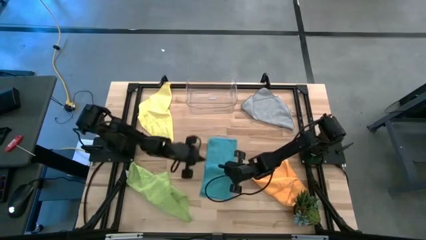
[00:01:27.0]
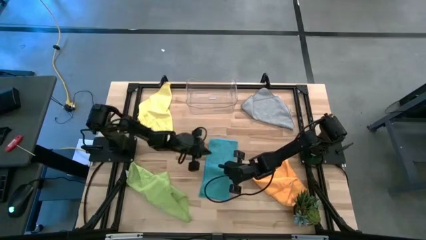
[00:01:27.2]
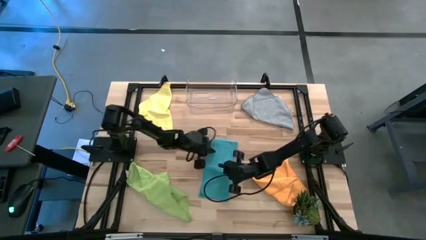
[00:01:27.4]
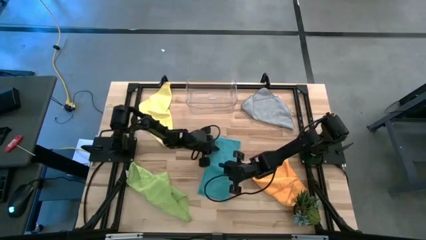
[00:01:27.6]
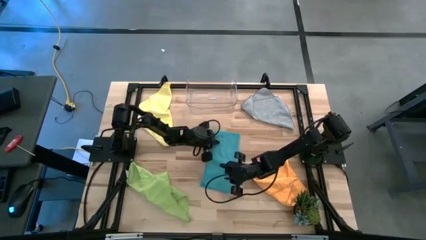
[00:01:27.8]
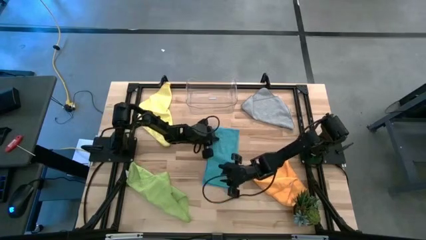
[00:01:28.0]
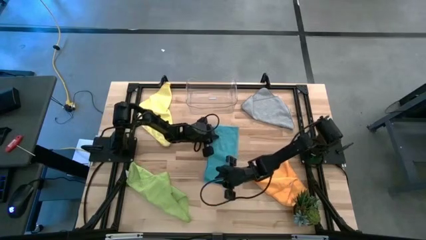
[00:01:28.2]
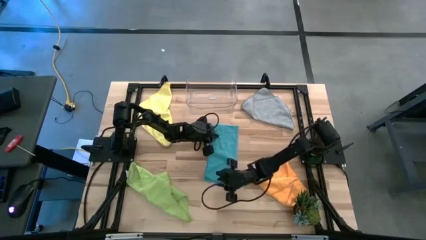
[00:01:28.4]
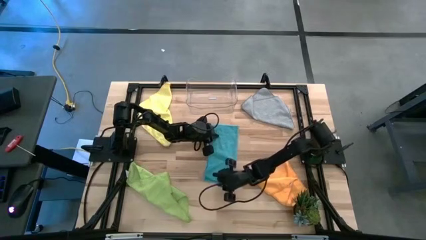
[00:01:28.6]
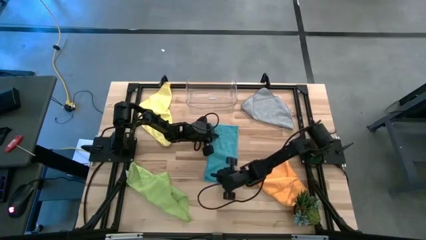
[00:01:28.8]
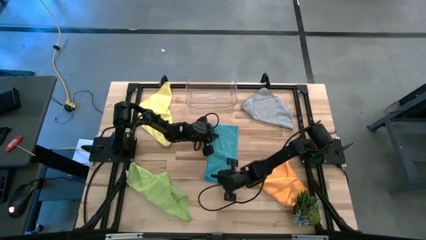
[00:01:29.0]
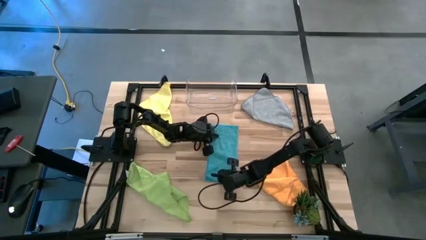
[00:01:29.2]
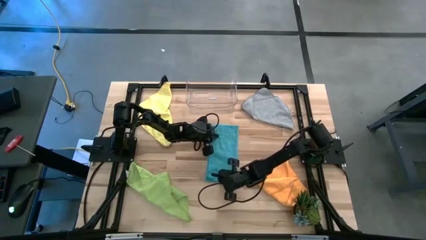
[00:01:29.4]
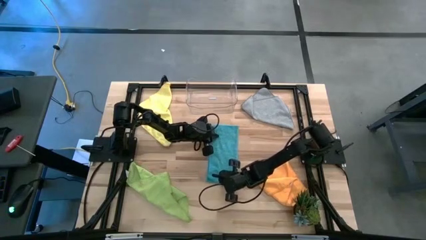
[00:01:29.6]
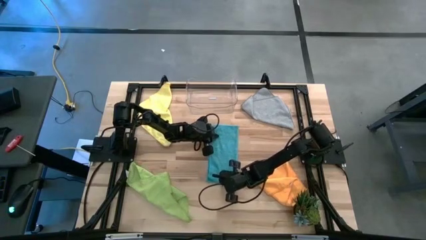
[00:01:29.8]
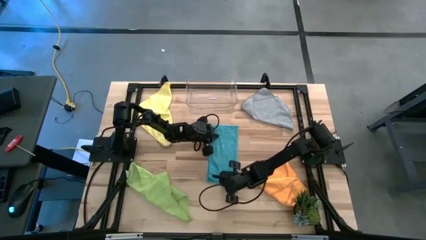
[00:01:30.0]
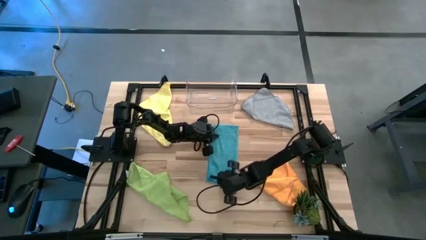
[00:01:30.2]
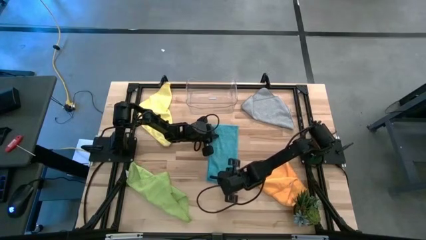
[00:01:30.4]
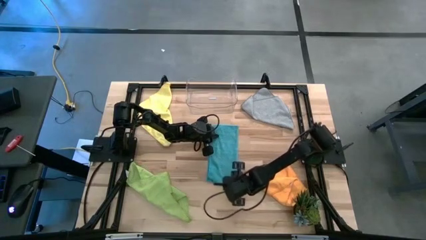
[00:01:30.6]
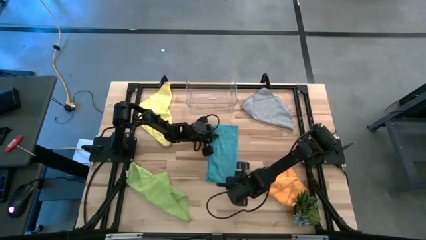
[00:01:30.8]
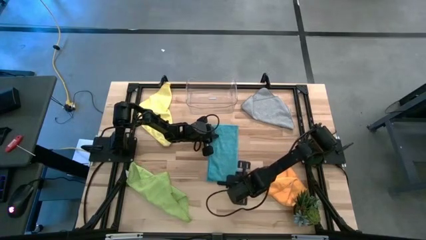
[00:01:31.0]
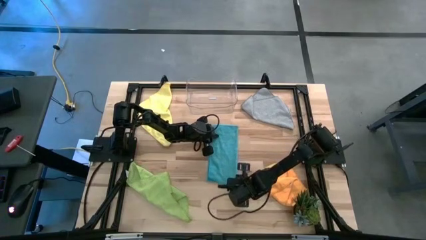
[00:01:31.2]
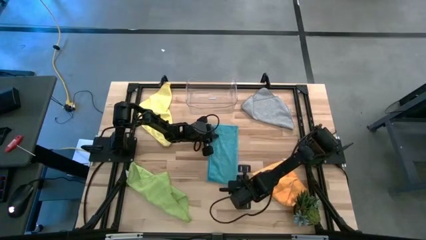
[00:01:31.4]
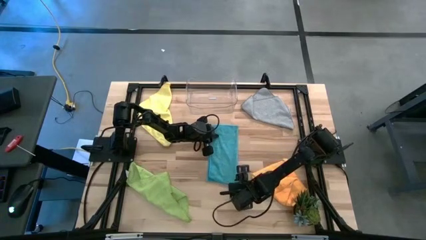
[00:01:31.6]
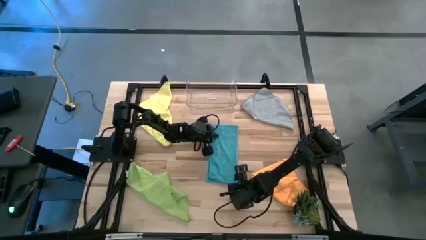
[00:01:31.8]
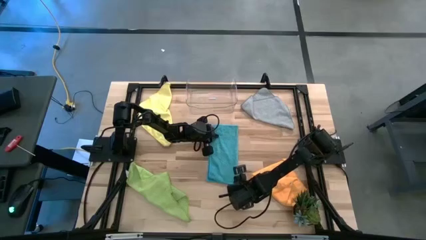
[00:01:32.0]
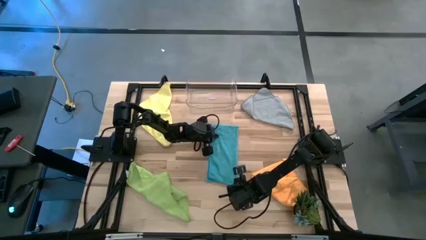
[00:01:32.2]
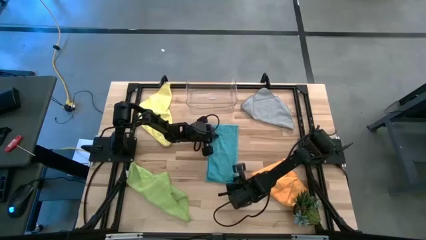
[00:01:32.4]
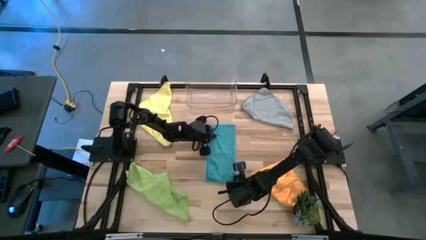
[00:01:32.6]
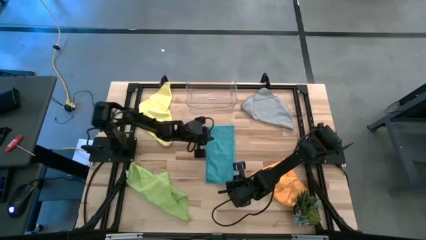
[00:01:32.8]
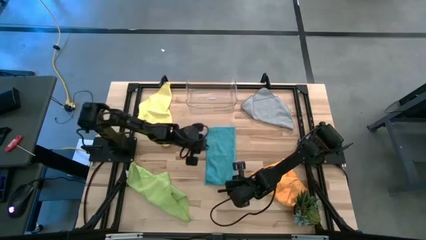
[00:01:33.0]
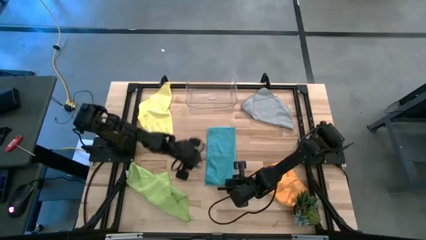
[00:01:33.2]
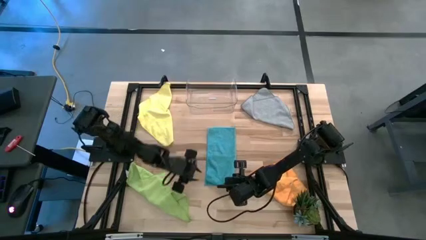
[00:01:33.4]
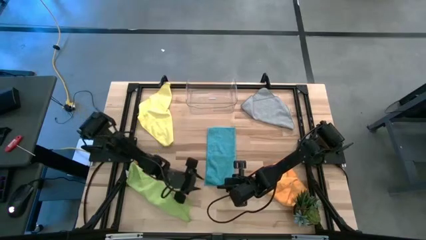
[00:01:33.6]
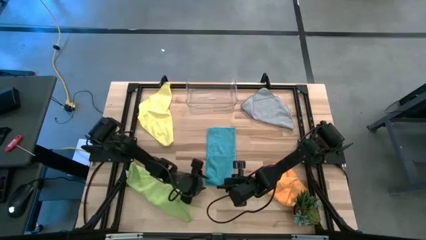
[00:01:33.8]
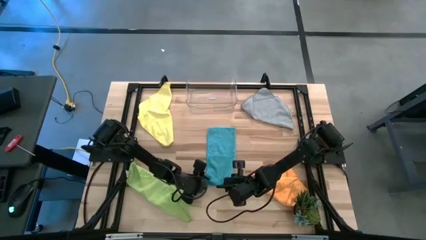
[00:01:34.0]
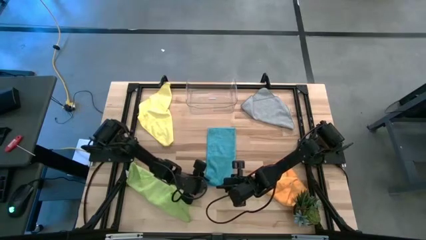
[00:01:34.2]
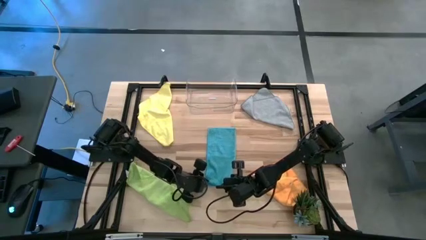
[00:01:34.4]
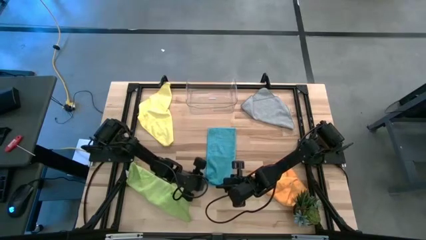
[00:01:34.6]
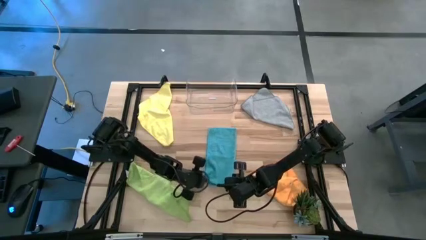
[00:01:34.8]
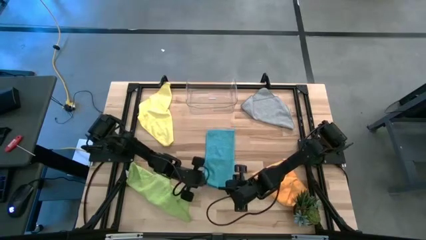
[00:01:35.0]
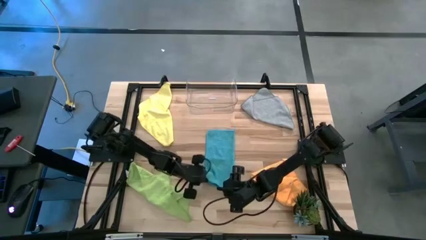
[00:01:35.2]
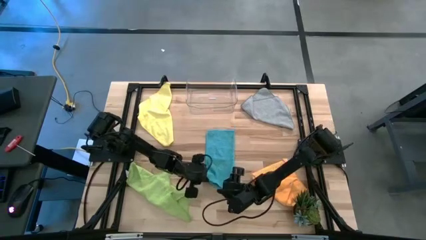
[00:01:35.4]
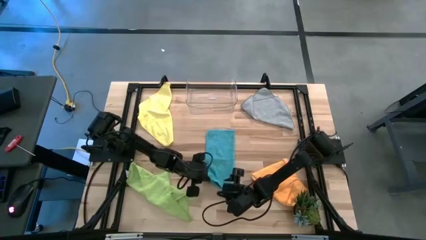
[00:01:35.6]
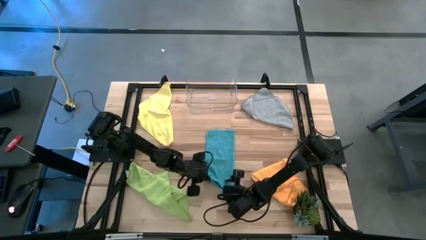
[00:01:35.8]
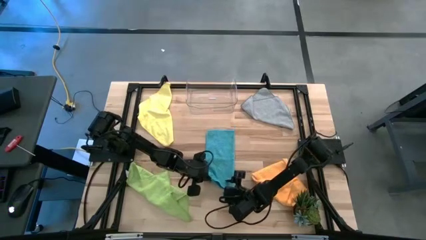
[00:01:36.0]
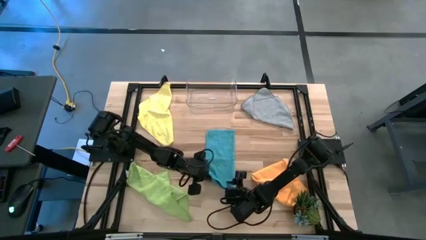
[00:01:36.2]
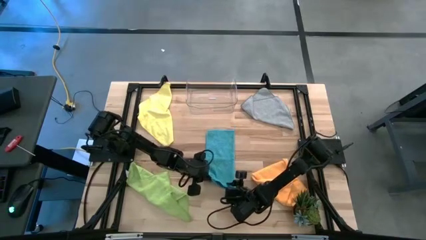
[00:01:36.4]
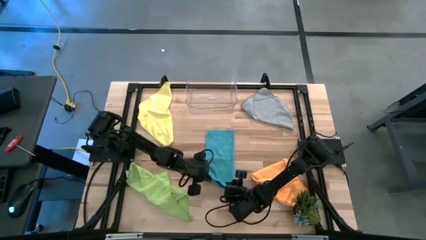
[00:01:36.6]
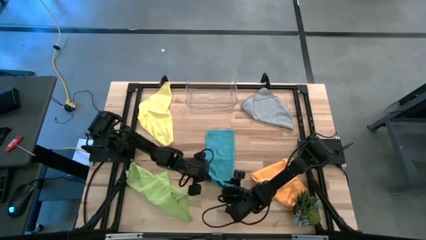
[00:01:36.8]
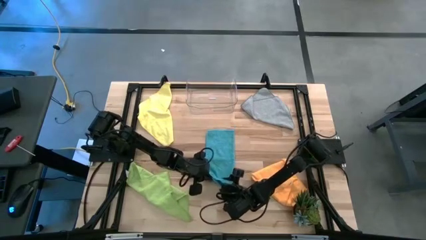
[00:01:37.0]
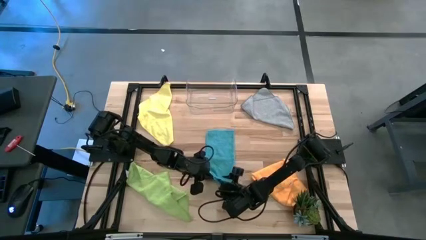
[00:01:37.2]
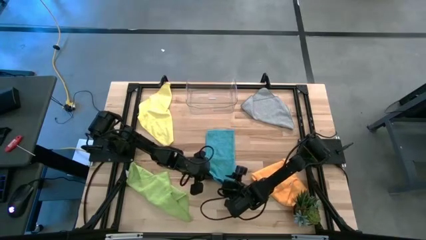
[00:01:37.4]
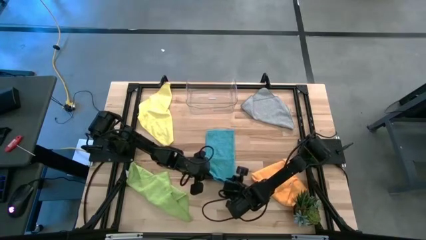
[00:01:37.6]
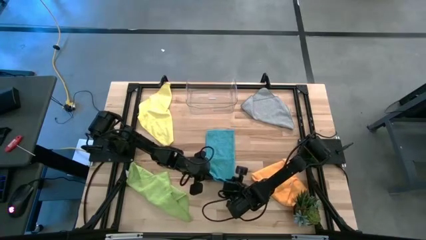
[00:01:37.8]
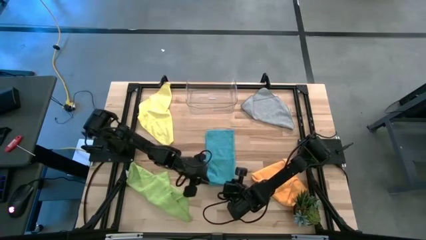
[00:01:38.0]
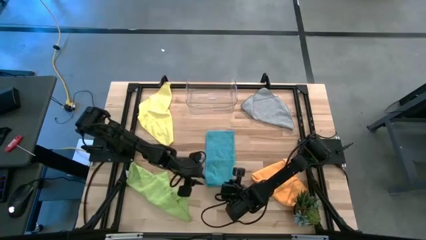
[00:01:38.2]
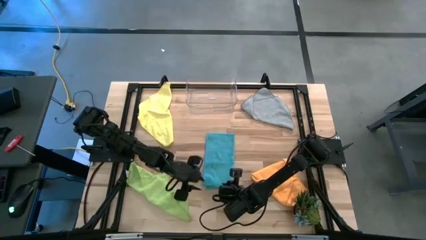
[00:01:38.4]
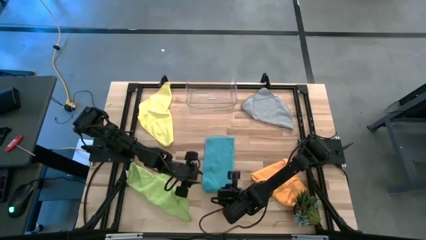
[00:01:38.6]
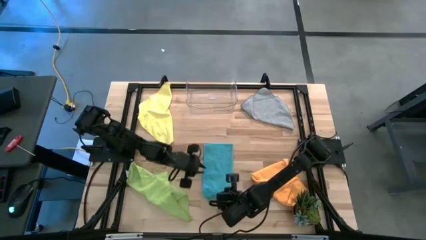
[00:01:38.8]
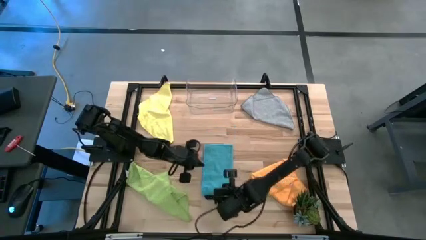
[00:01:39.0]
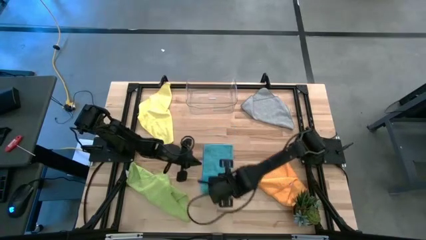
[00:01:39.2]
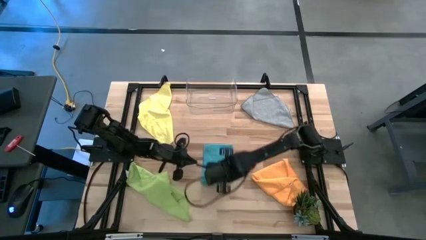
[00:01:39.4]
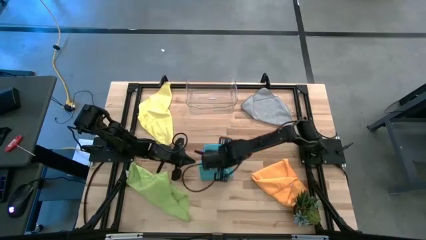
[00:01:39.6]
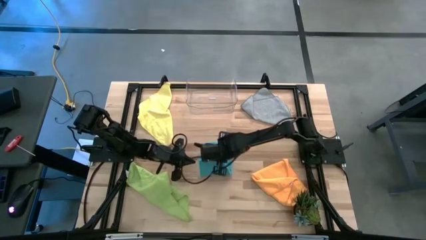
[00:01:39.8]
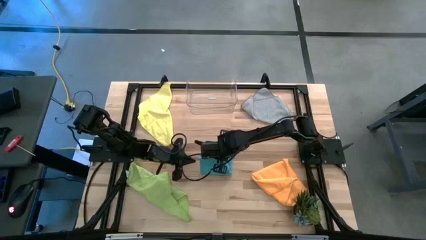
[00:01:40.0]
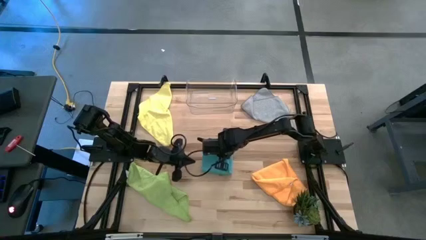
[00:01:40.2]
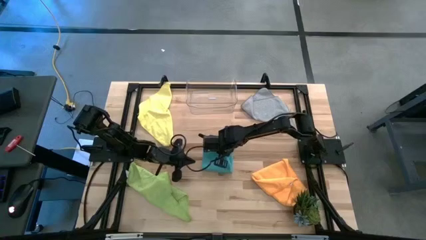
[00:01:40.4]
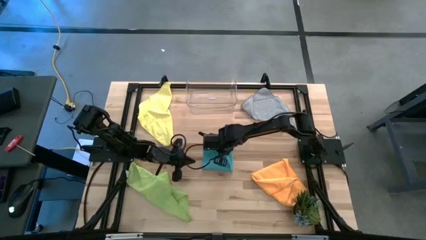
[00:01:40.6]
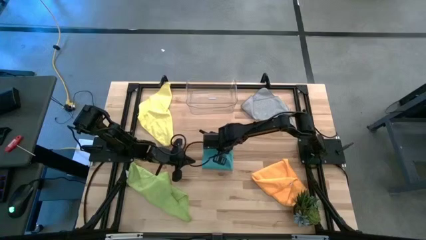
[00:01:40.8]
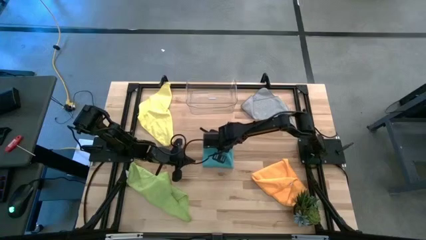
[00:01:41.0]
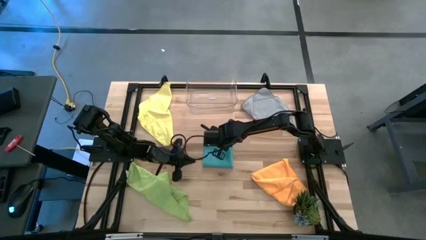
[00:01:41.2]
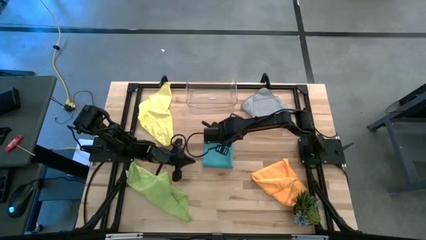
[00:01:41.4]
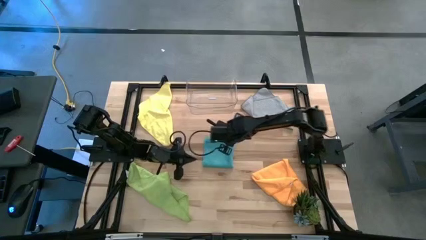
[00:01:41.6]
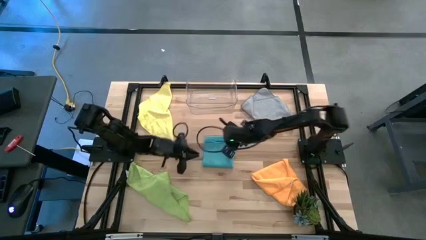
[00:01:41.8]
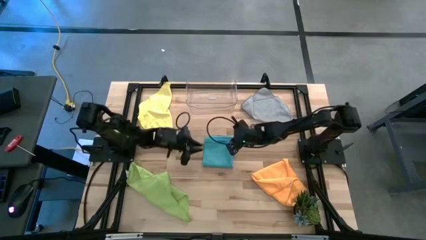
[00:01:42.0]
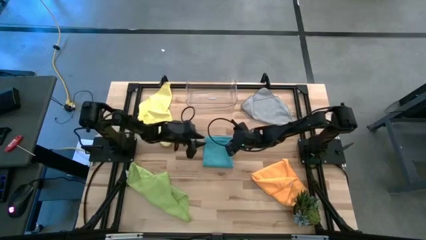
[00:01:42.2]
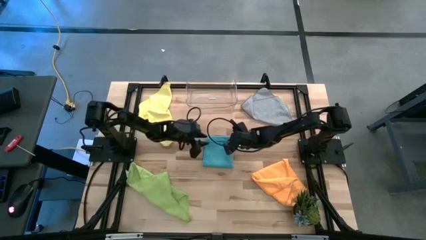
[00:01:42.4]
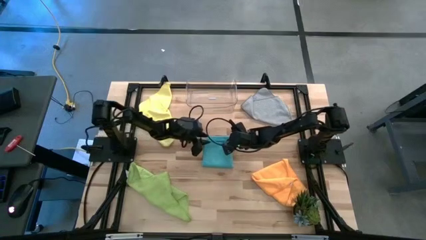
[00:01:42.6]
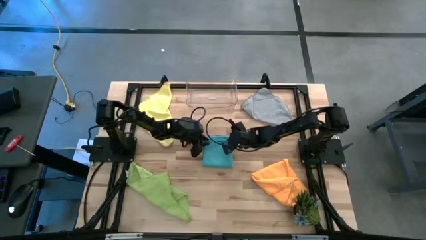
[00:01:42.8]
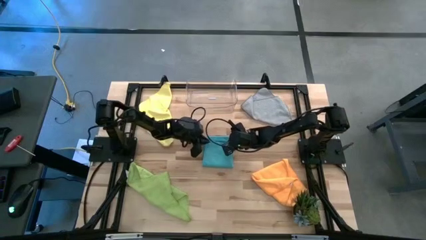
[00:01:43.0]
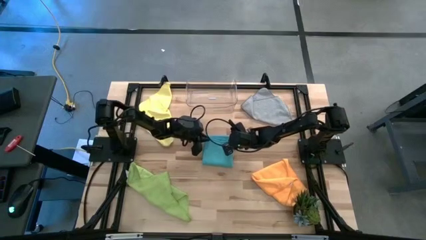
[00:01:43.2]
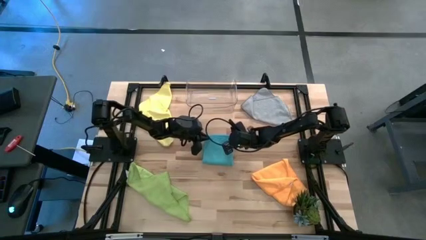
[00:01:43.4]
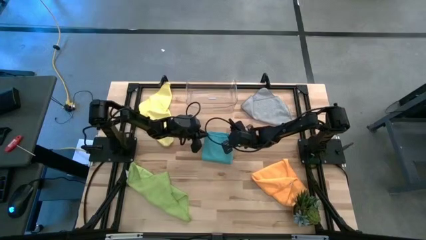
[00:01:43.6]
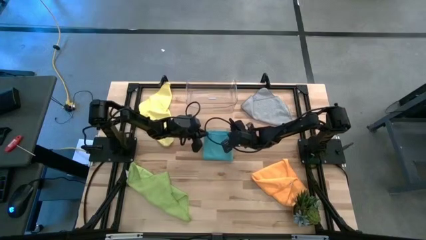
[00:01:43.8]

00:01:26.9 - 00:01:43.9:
Task: Fold microfiber towels
Fold the blue towel
